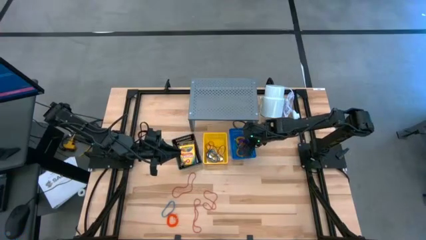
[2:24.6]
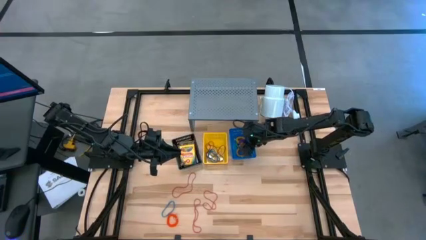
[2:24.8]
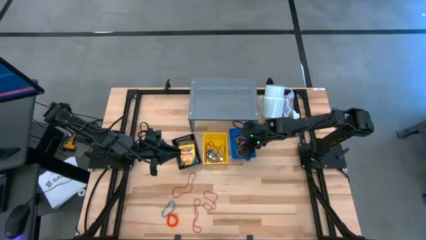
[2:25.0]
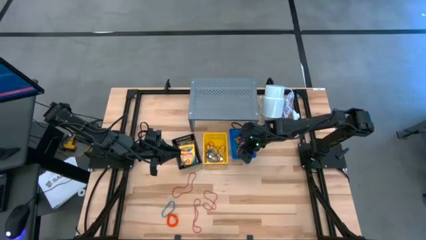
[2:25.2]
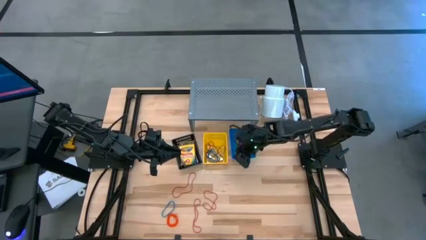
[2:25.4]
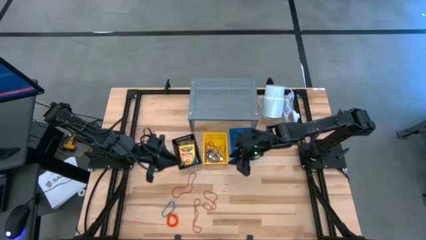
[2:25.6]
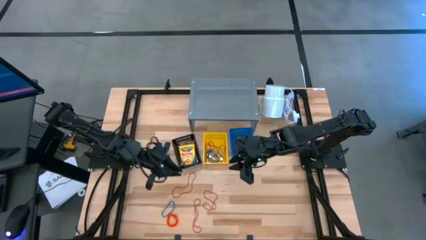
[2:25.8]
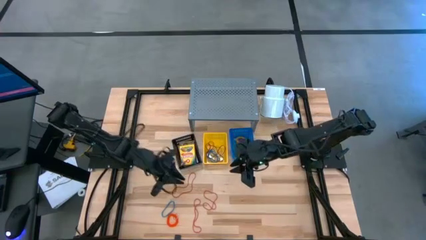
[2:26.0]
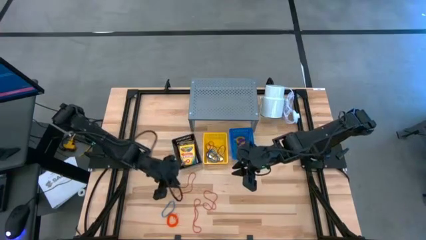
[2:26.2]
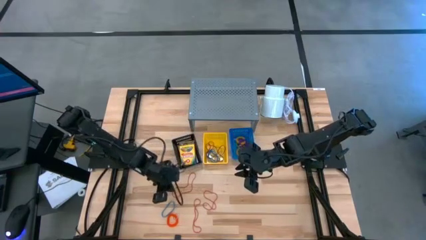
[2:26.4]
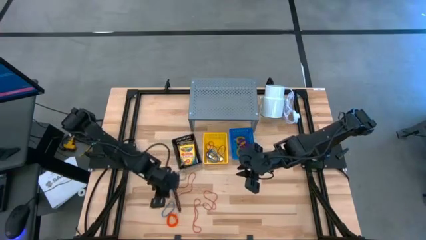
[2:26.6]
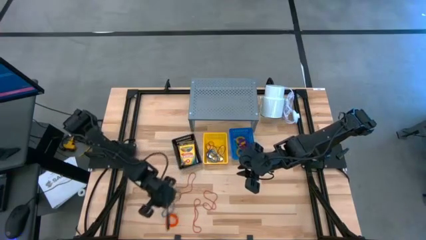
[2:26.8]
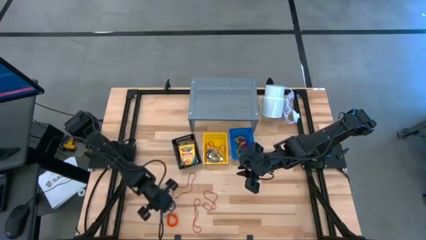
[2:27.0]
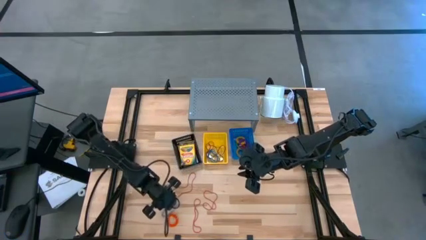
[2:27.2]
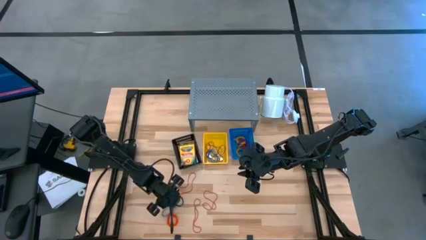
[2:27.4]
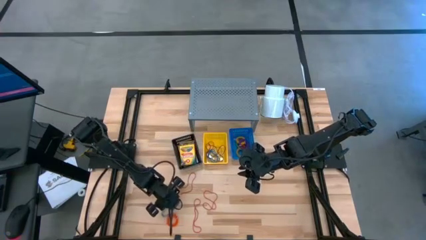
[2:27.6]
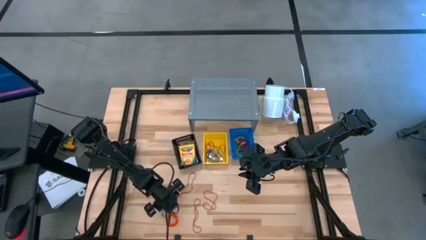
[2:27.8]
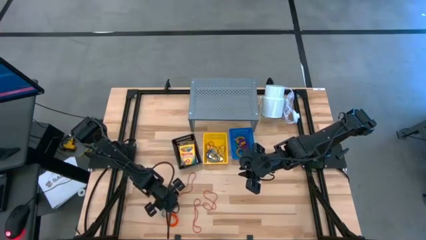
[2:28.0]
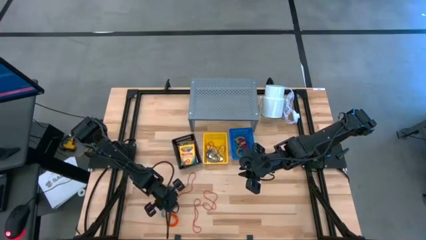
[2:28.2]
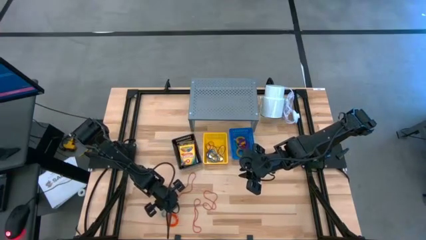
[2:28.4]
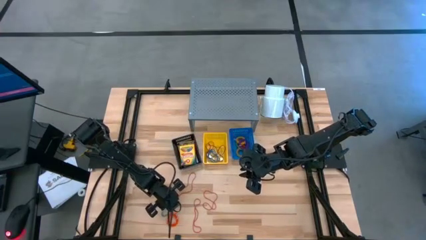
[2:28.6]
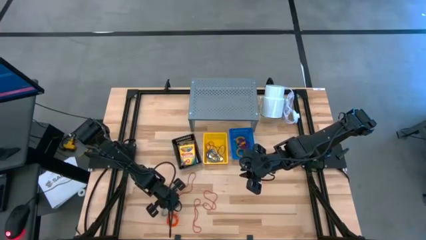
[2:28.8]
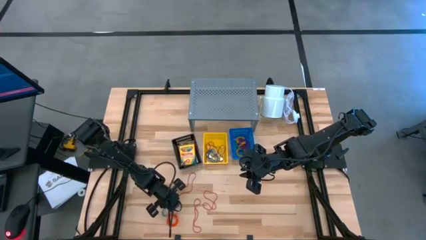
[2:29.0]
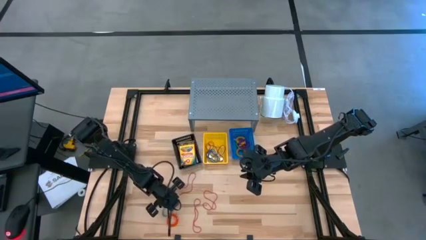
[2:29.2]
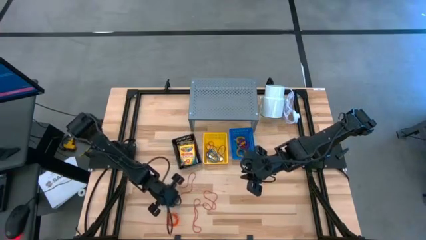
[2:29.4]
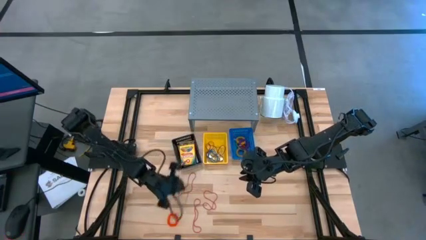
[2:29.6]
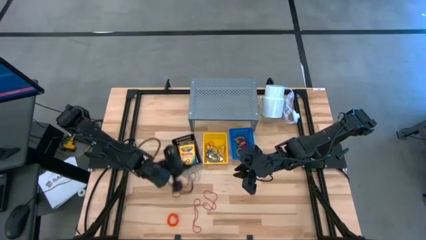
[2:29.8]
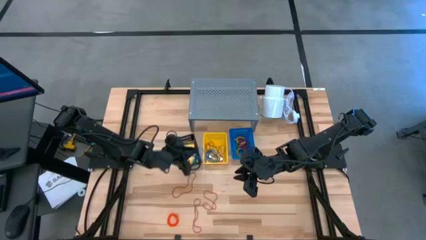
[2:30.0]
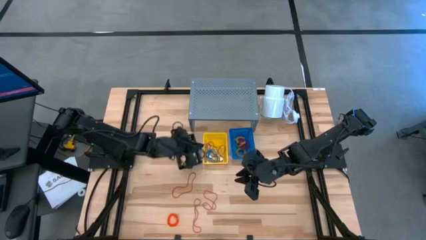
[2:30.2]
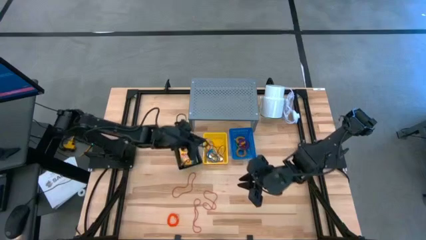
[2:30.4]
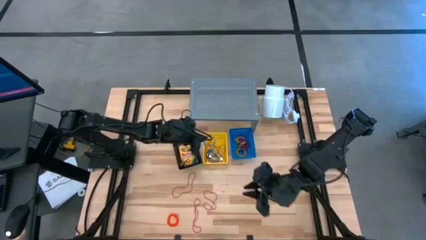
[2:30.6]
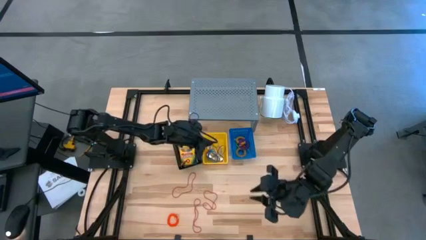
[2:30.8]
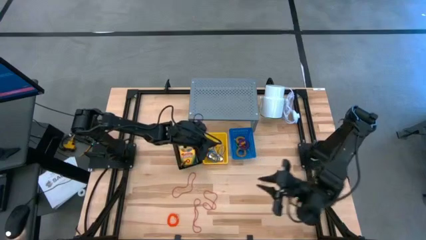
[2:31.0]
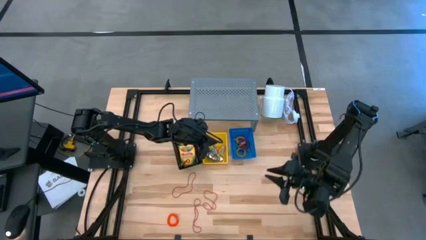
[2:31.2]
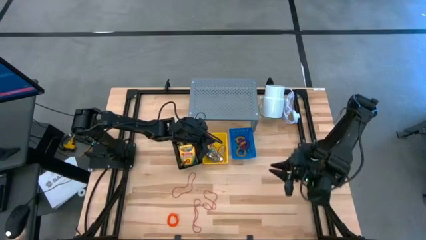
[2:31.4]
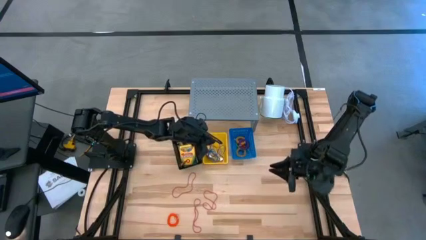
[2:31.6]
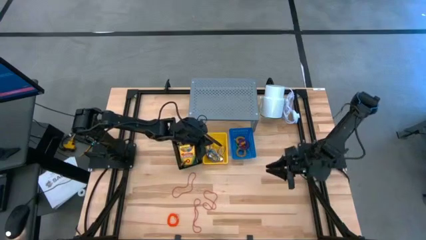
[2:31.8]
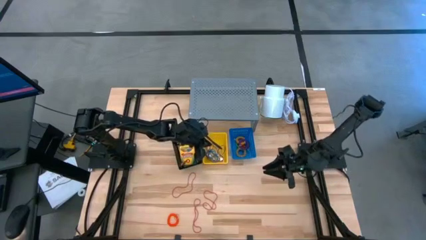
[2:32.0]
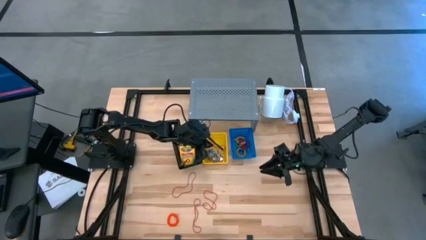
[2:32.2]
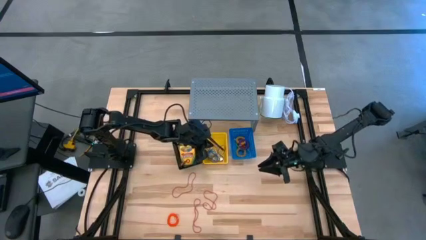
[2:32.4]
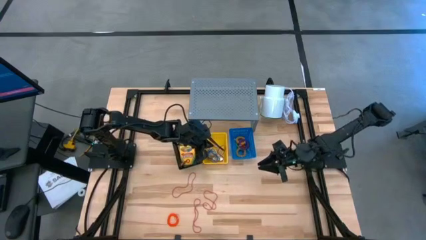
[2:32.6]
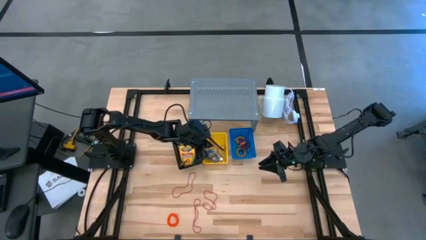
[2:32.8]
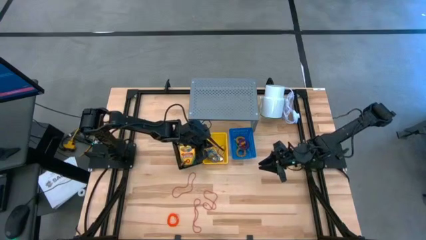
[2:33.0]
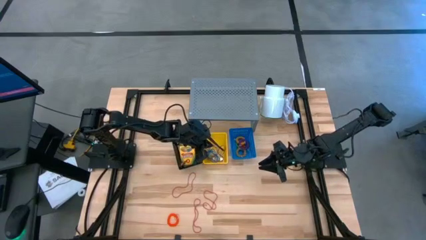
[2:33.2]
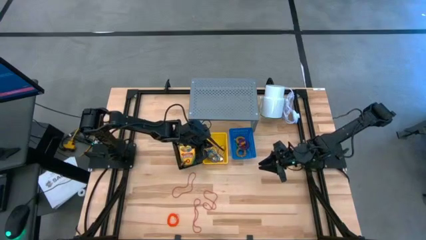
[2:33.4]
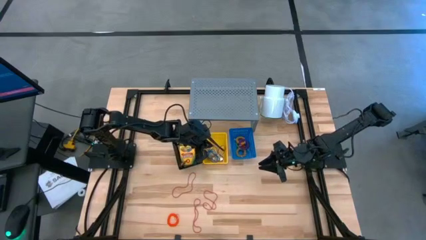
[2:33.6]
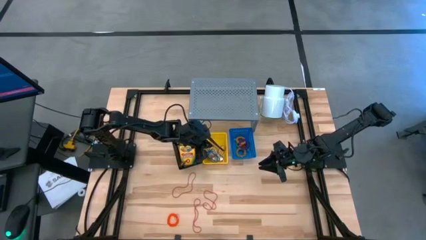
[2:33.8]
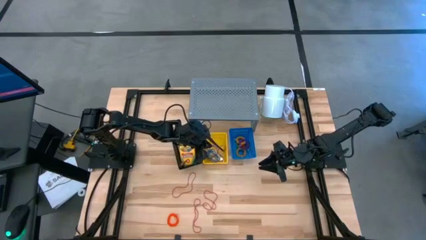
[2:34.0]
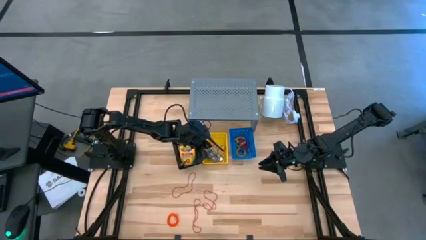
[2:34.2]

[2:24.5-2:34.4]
Task: Pick & Place Office Desk Supplies
Put the blue rubber band into the yellow basket

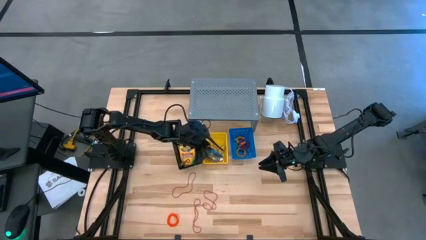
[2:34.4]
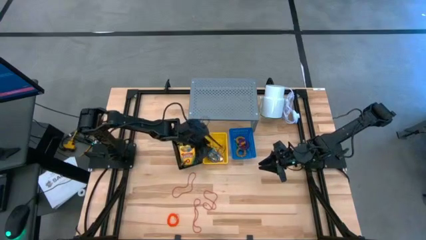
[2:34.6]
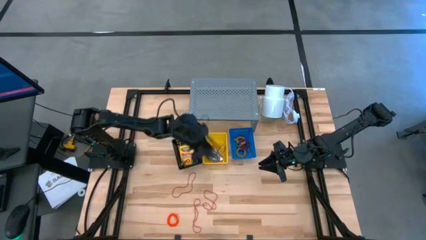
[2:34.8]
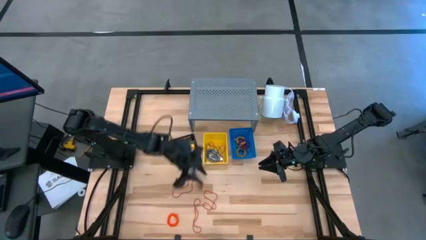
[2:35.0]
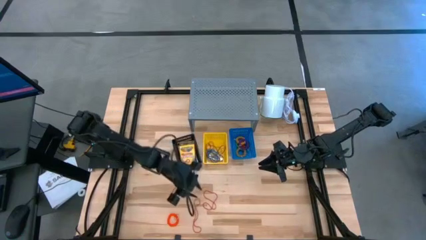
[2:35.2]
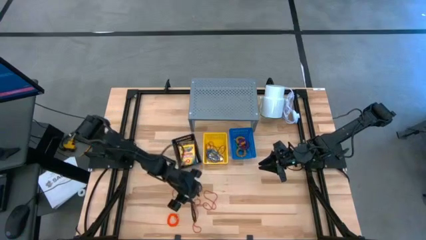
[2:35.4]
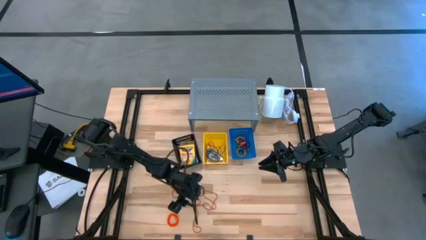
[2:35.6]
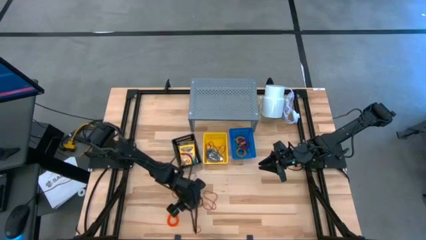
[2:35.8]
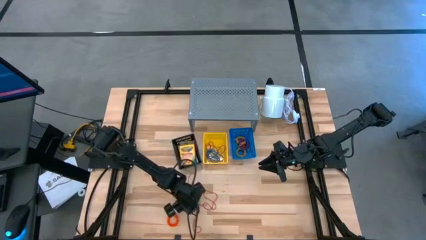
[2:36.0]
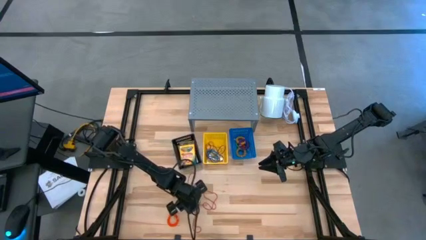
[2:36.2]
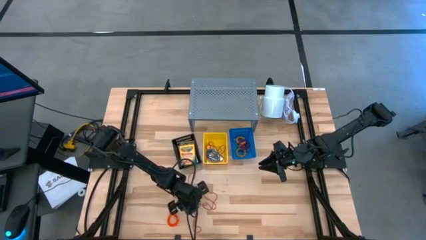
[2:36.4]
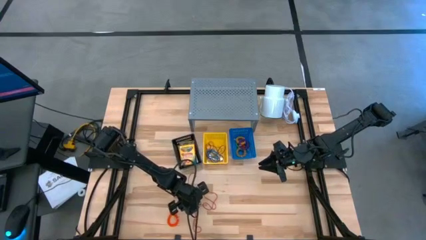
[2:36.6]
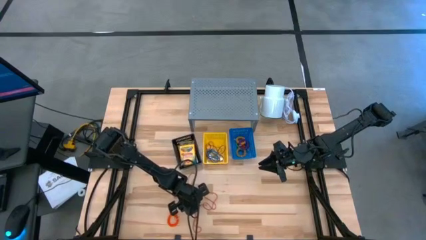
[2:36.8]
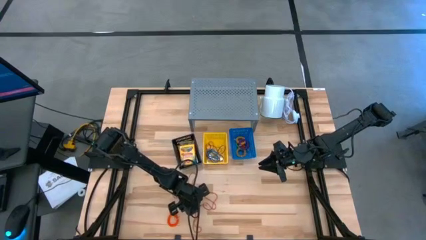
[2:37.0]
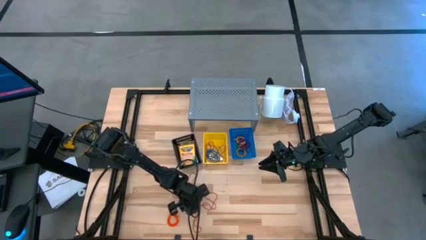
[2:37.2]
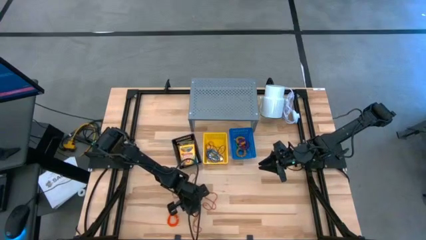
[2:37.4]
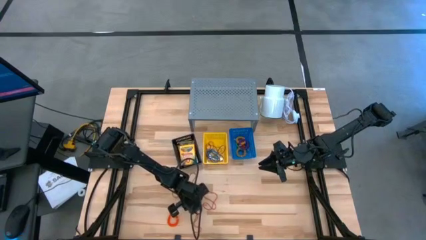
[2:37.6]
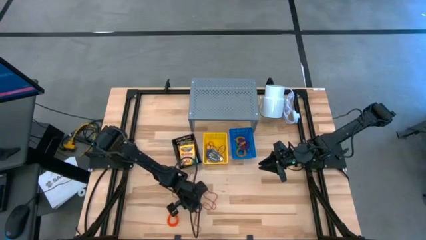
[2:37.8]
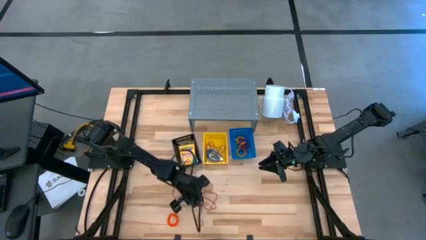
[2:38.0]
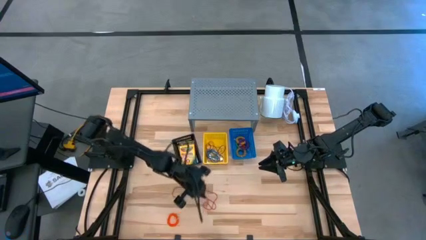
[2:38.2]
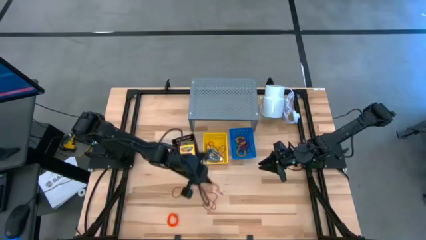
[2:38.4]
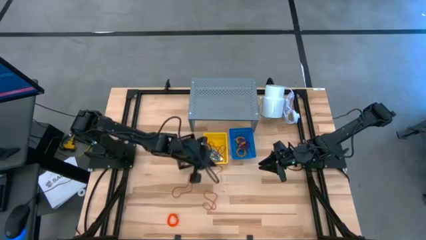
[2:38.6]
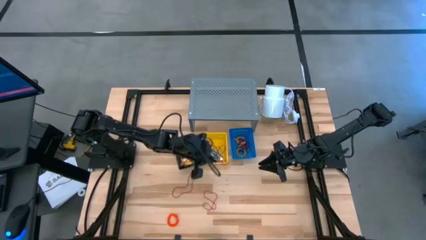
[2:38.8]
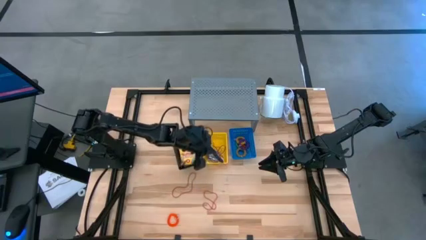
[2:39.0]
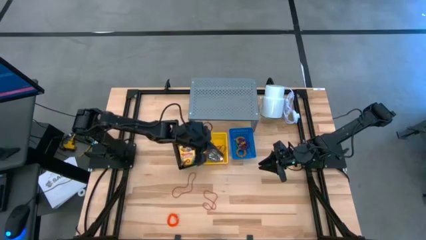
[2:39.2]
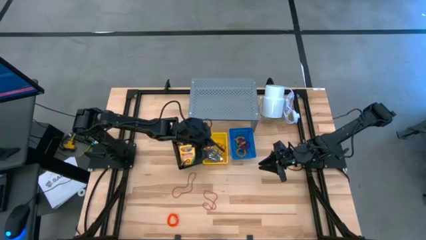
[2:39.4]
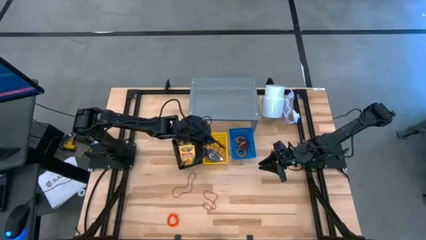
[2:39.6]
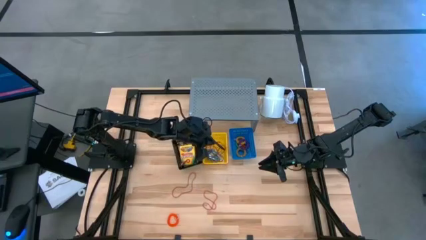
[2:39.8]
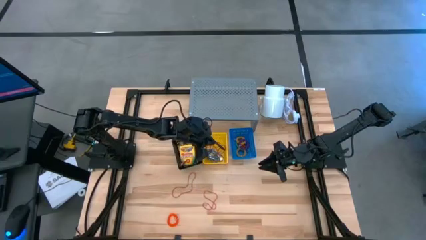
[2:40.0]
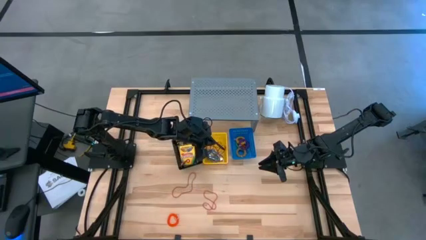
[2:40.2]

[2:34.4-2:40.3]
Put the red rubber band into the yellow basket
